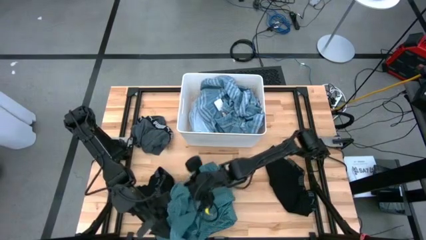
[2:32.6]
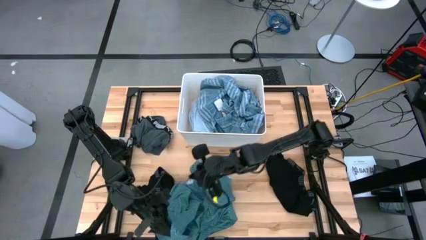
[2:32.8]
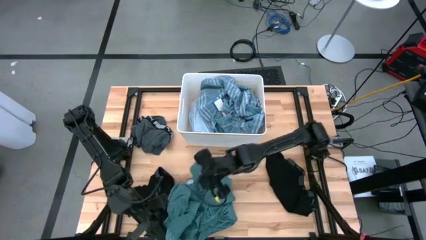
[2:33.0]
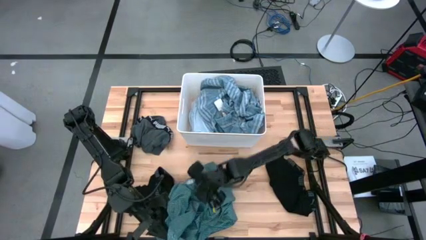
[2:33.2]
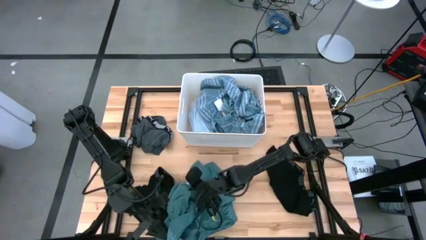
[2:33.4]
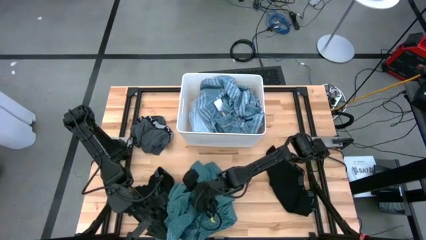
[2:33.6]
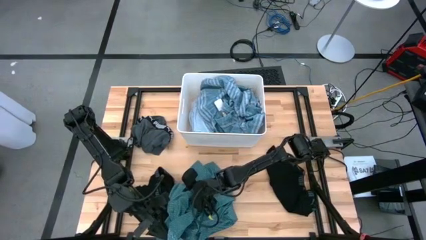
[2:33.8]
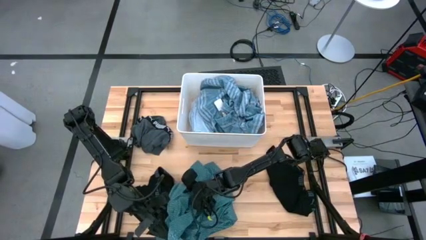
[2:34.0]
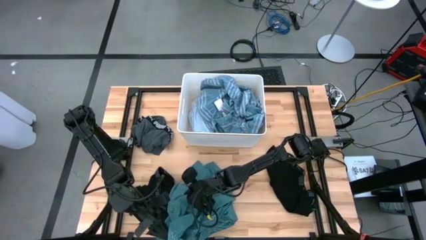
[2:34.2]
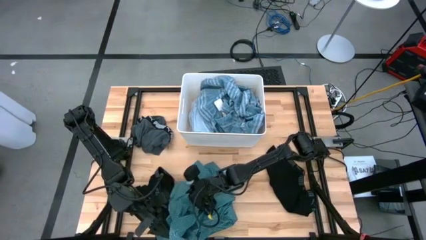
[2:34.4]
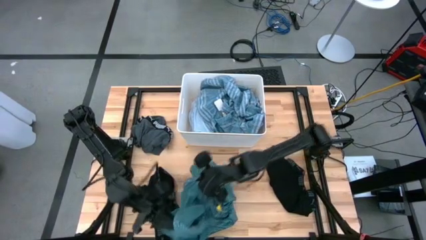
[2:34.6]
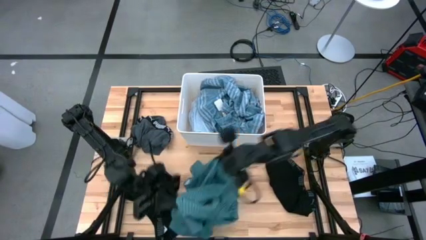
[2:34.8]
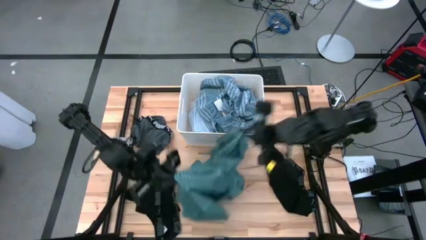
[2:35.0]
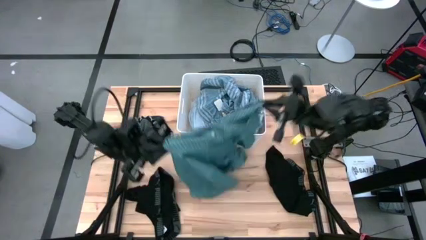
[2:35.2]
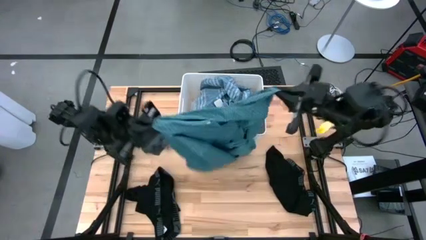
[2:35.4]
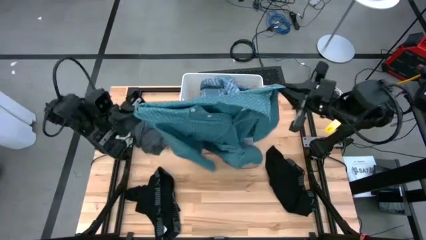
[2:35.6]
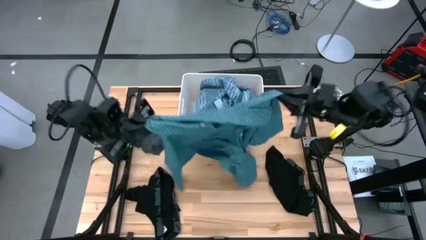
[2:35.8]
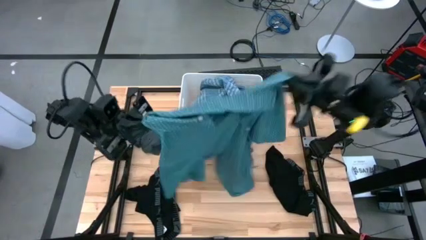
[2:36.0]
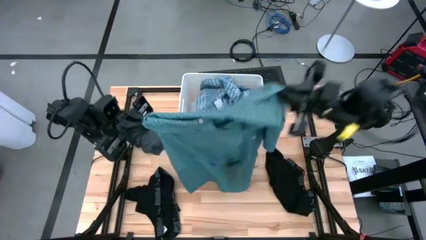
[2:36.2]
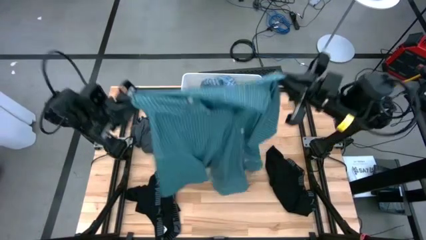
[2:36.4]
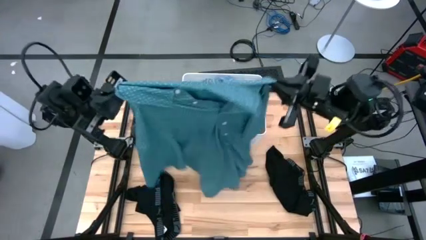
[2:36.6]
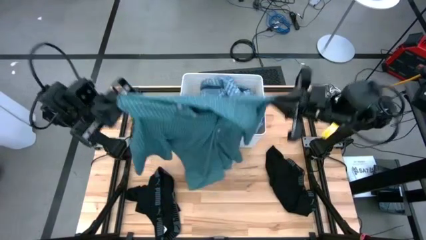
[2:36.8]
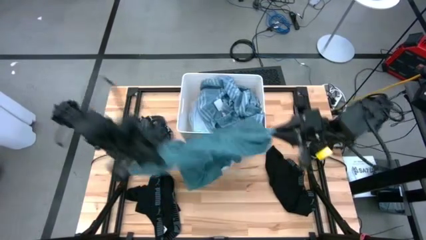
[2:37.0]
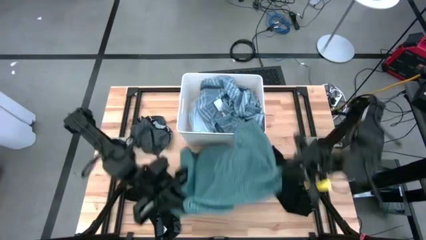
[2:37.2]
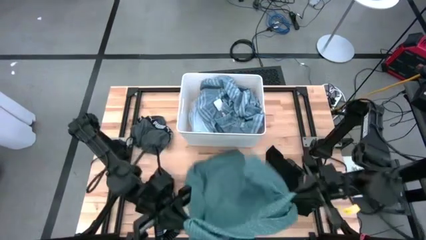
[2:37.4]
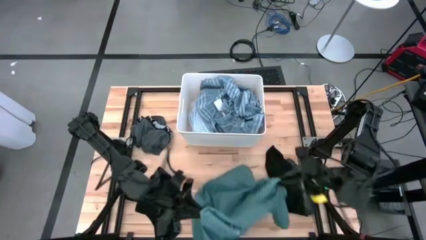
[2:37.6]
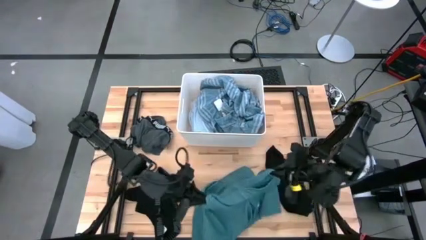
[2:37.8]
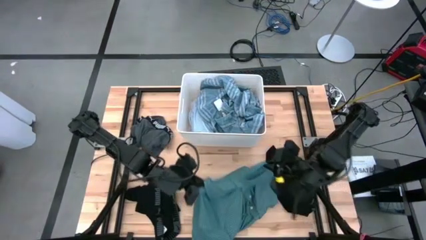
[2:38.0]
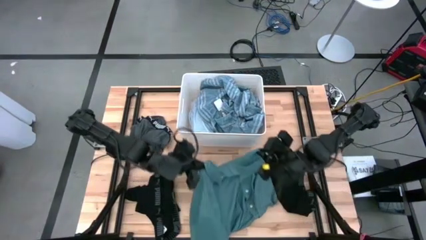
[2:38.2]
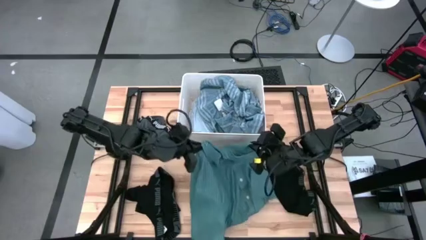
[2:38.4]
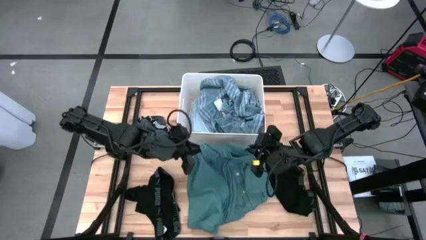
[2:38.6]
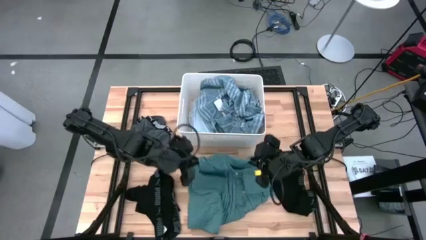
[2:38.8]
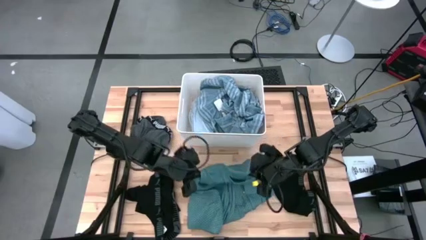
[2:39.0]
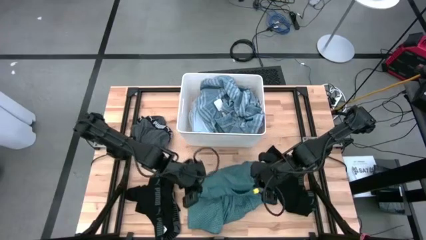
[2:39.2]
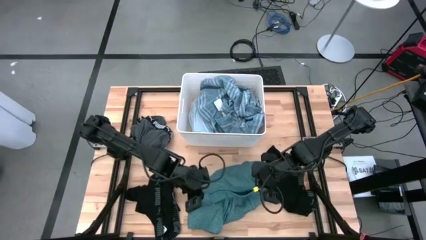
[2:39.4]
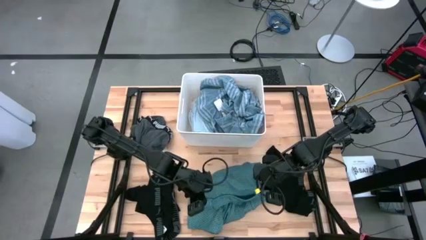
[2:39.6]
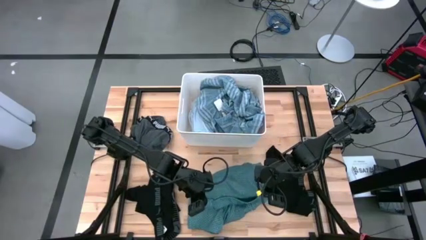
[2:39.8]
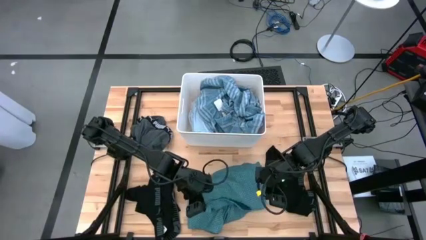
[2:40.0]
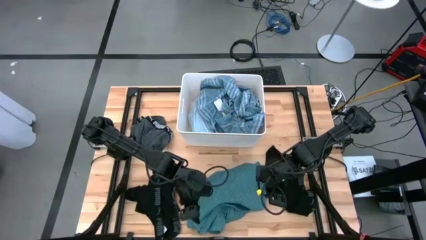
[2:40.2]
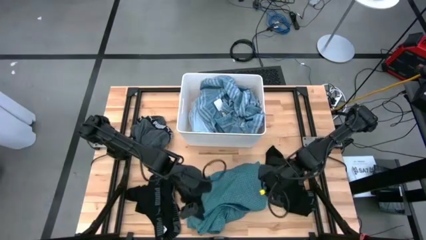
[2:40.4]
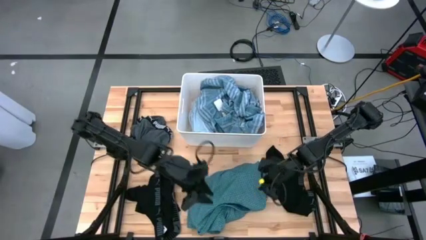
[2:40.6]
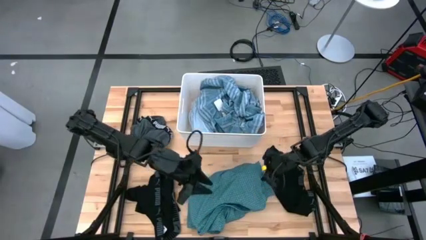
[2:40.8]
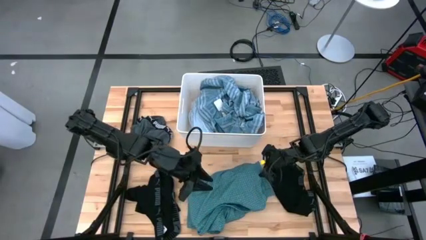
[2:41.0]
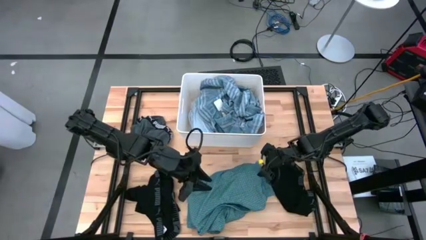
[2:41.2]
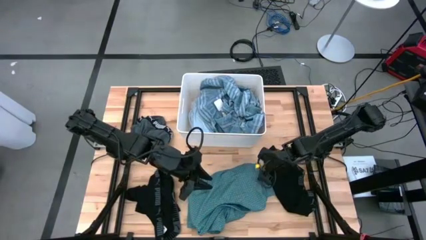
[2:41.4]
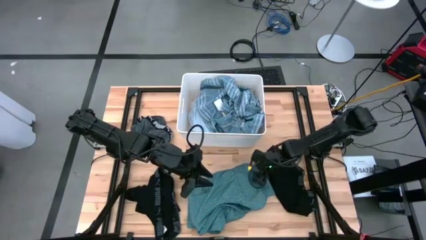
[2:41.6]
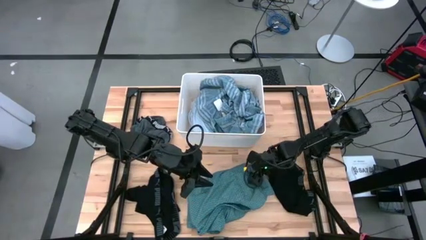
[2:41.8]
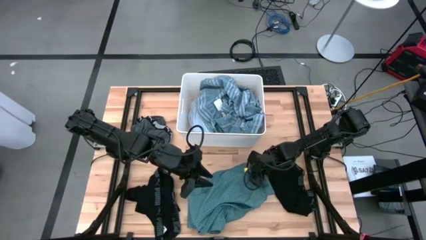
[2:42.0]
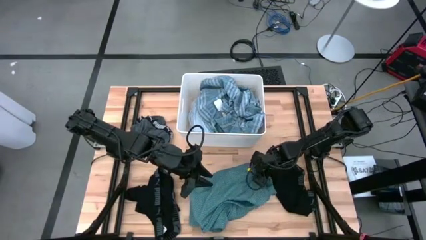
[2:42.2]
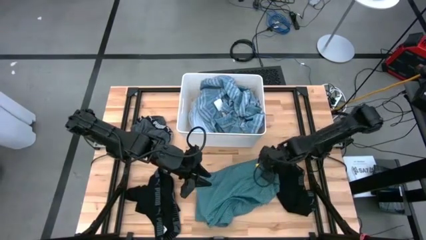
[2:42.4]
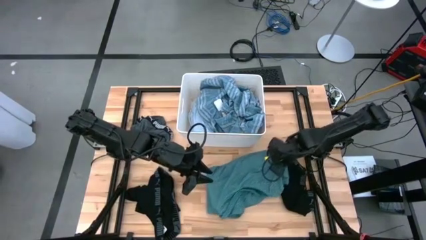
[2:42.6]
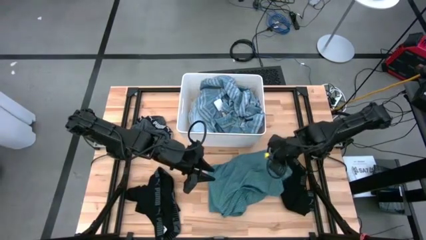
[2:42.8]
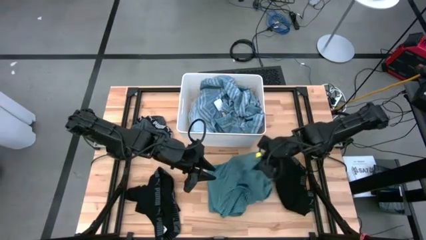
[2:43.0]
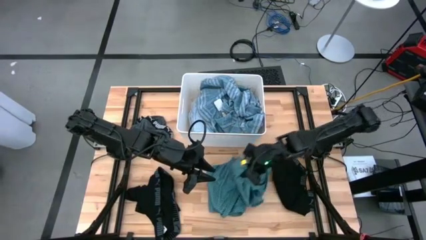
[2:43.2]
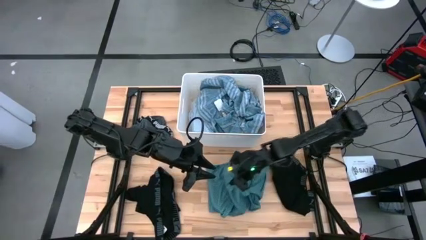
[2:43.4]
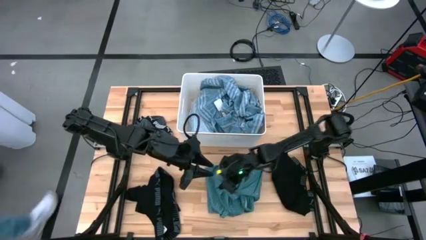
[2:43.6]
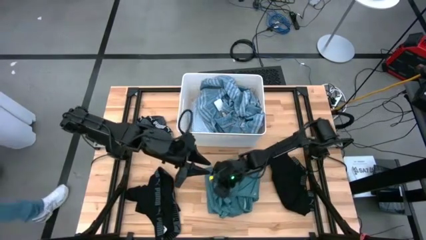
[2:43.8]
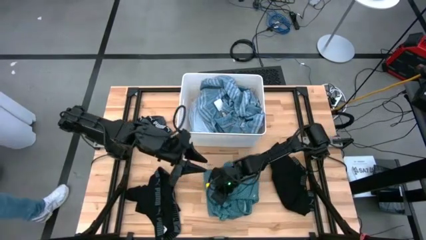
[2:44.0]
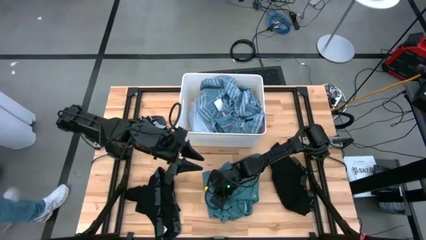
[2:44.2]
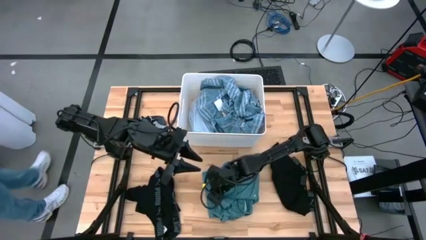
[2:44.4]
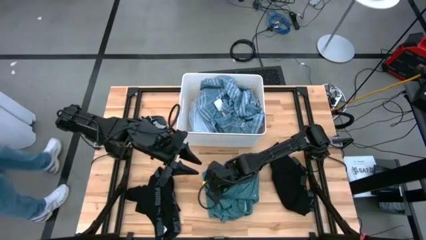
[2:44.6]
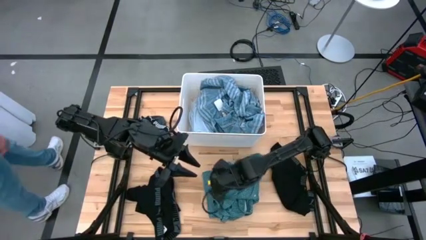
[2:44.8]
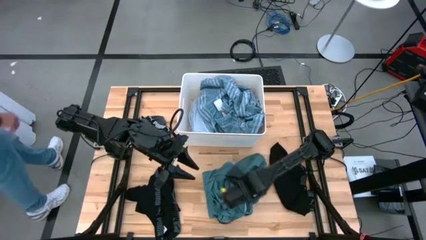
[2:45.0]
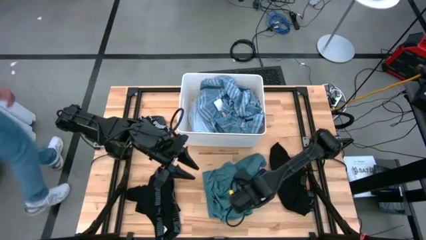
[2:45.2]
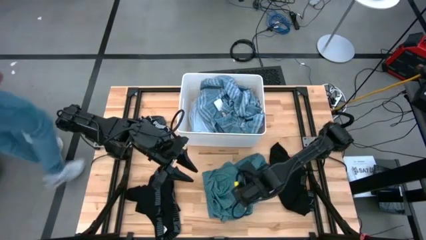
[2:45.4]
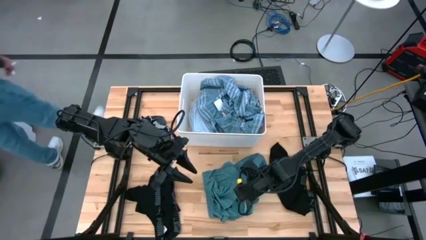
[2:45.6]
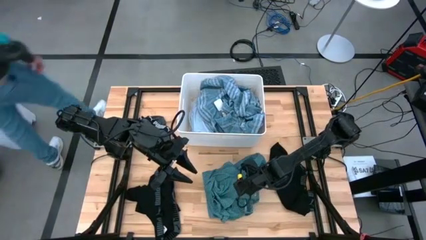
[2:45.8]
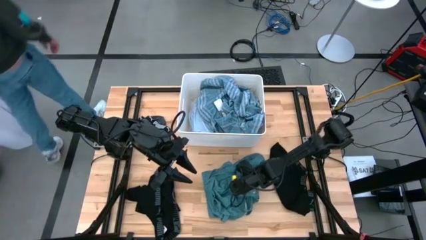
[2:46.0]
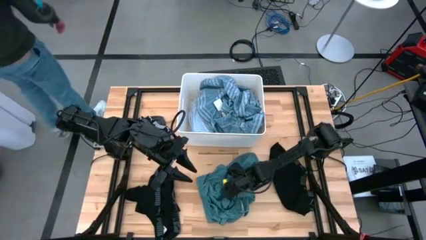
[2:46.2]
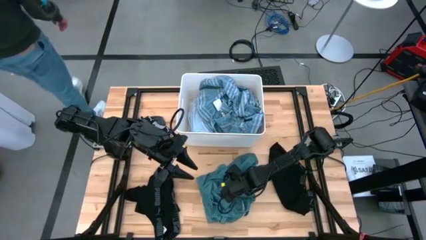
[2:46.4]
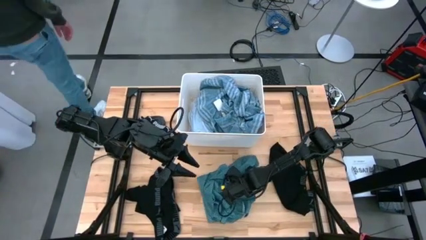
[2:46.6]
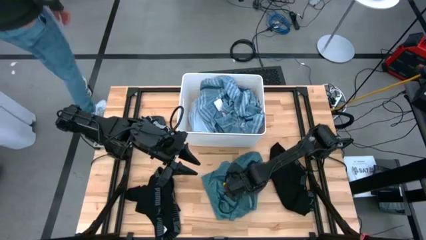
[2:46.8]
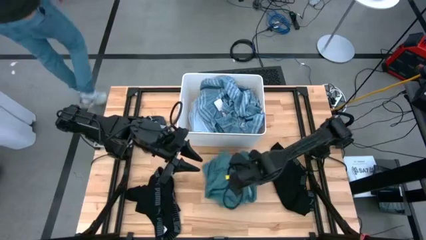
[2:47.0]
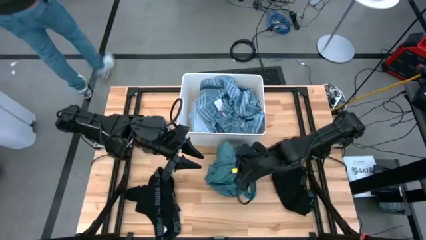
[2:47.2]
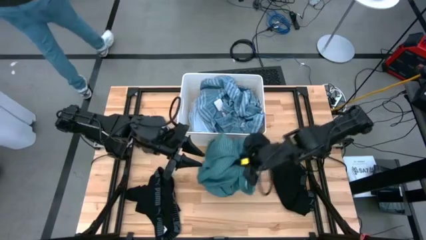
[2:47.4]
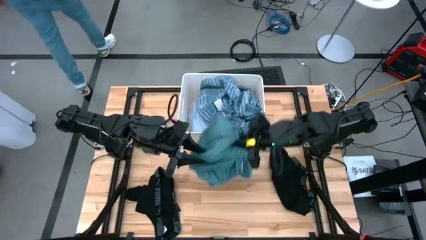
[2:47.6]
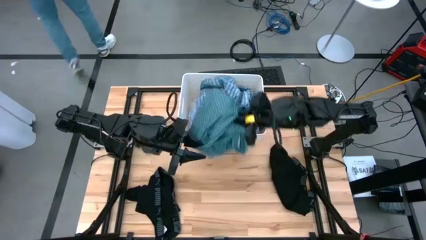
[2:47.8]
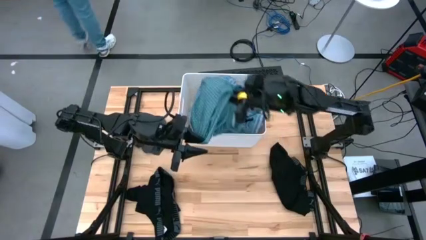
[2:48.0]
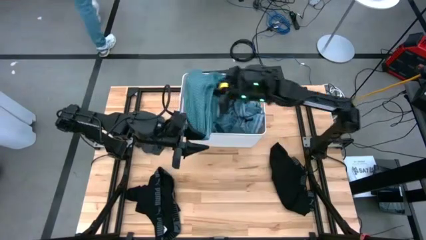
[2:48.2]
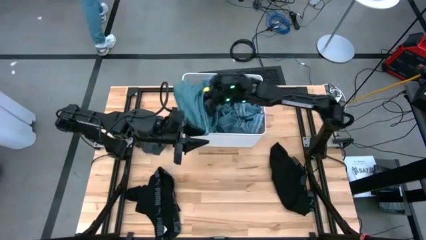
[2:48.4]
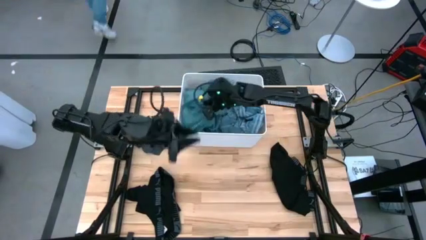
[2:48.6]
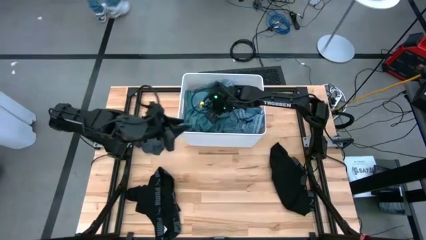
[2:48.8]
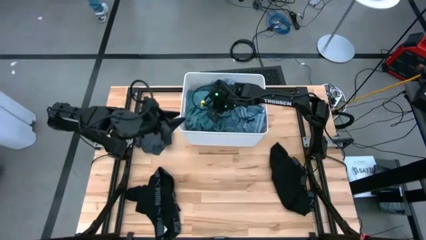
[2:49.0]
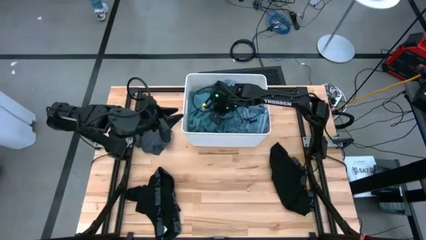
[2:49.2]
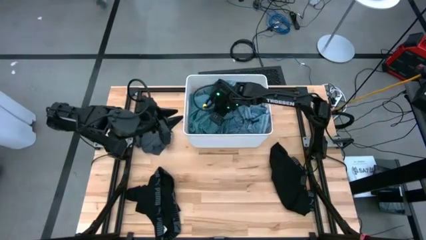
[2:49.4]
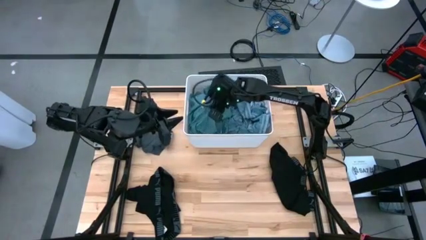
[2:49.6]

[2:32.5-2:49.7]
Task: Sort clothes
Put the green polo shirt into the white laundry organizer
